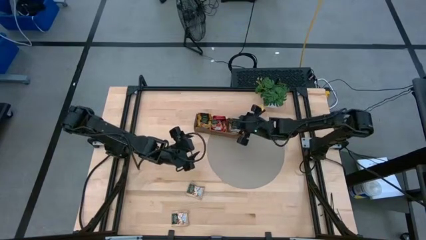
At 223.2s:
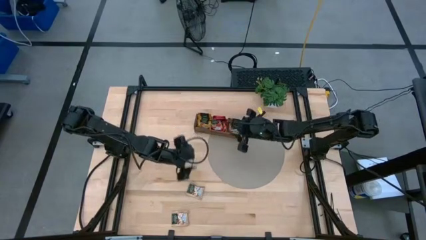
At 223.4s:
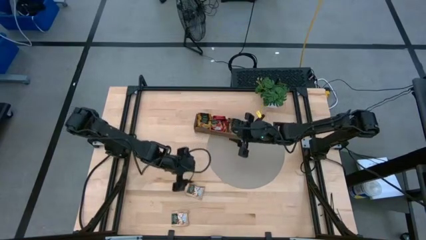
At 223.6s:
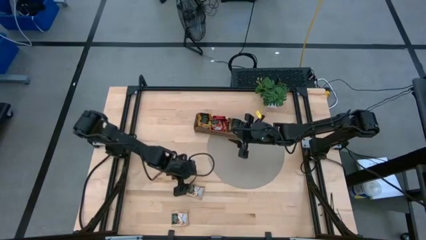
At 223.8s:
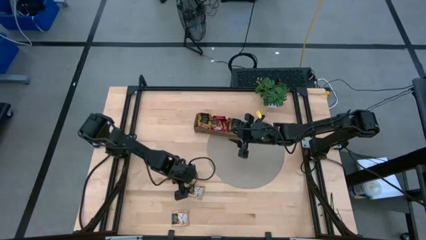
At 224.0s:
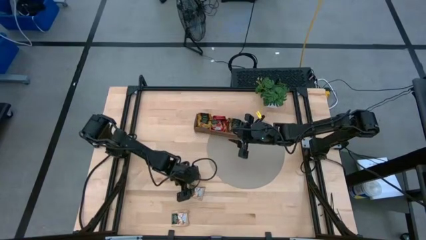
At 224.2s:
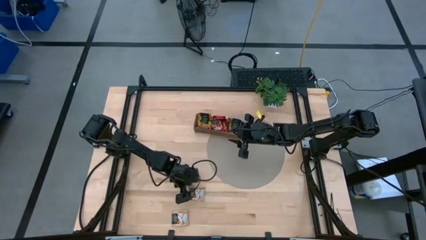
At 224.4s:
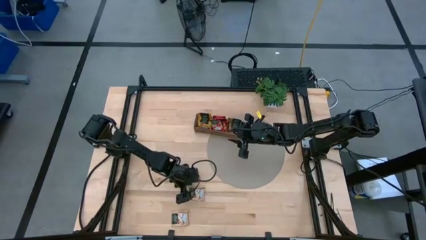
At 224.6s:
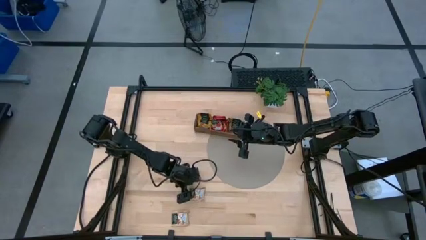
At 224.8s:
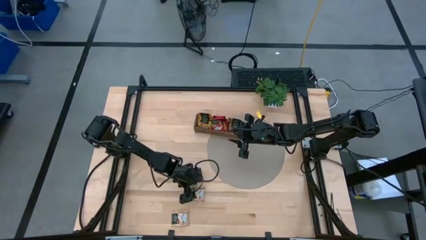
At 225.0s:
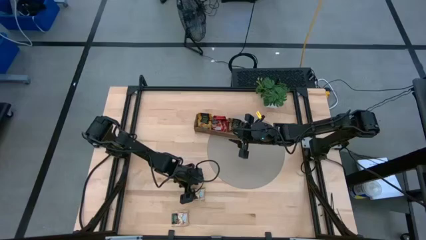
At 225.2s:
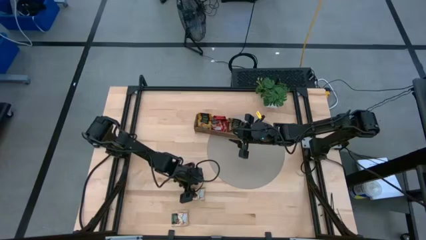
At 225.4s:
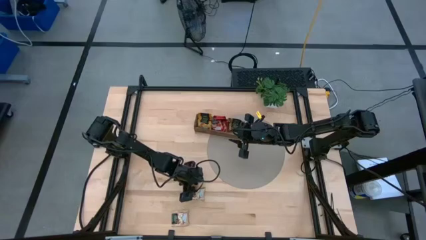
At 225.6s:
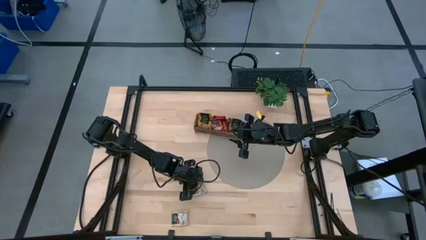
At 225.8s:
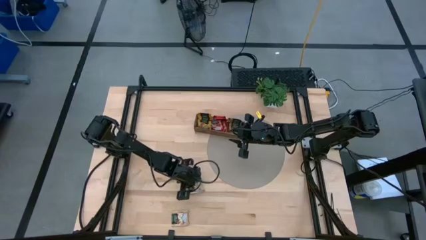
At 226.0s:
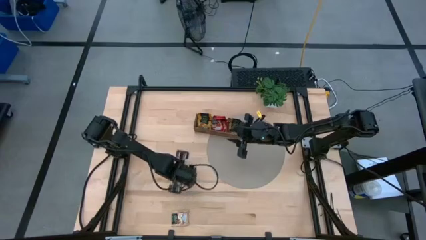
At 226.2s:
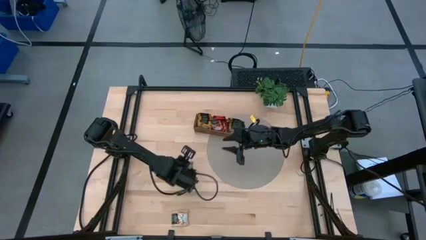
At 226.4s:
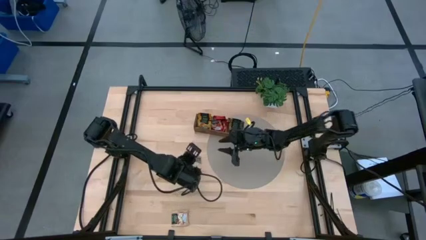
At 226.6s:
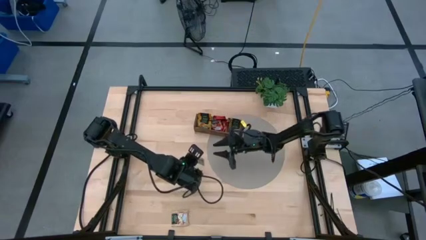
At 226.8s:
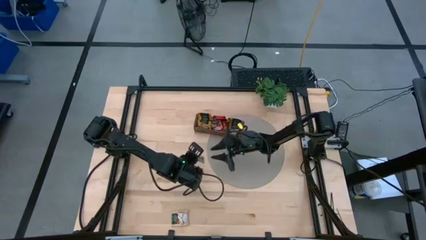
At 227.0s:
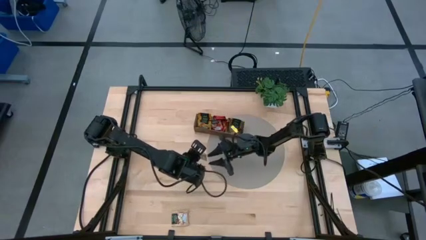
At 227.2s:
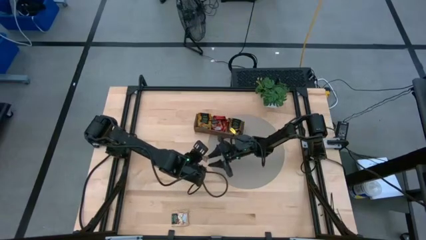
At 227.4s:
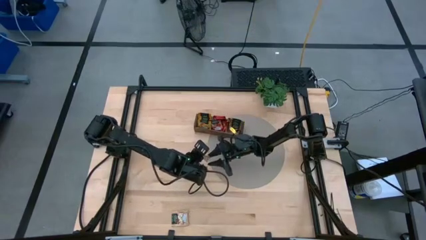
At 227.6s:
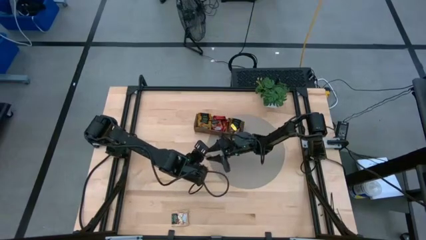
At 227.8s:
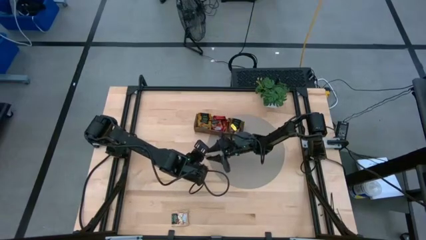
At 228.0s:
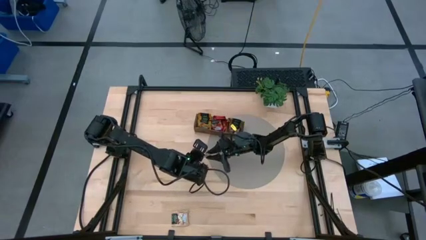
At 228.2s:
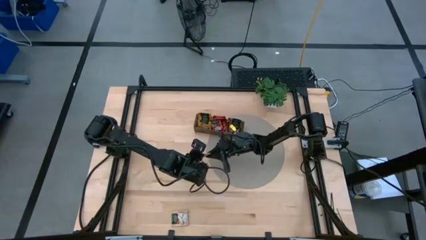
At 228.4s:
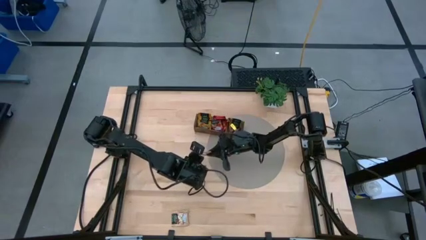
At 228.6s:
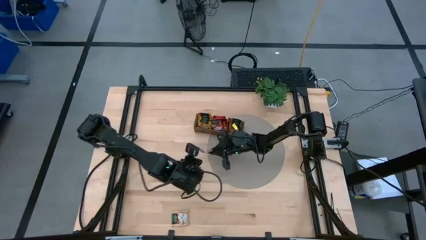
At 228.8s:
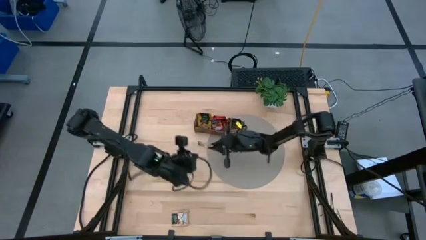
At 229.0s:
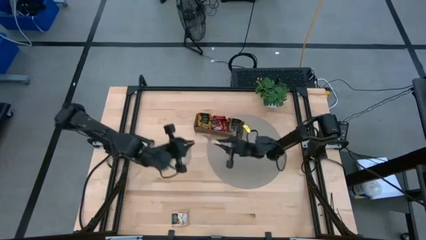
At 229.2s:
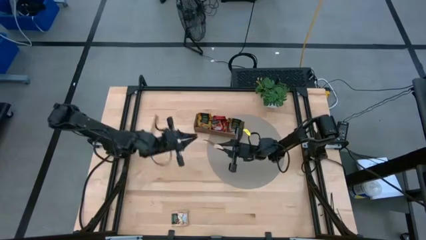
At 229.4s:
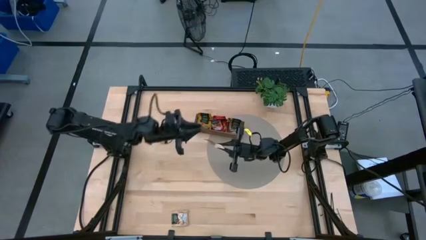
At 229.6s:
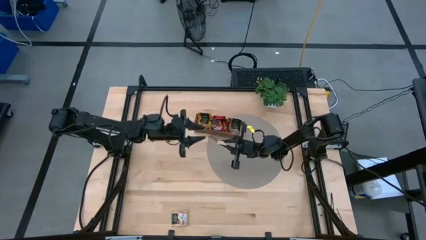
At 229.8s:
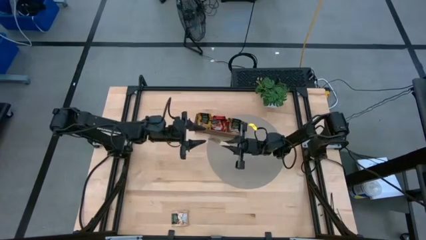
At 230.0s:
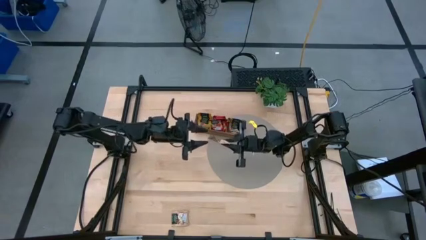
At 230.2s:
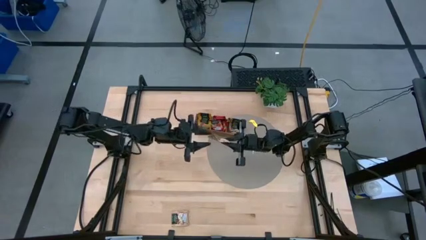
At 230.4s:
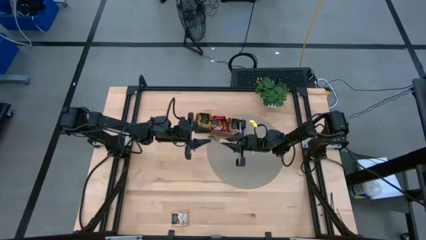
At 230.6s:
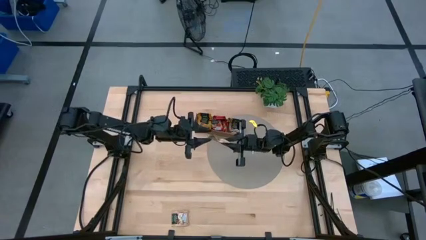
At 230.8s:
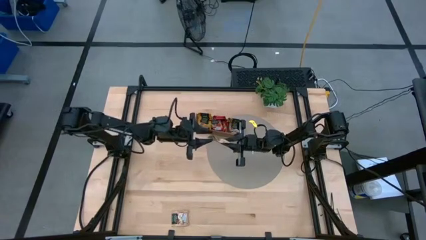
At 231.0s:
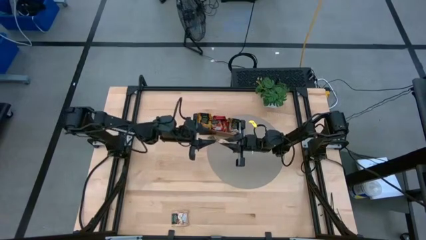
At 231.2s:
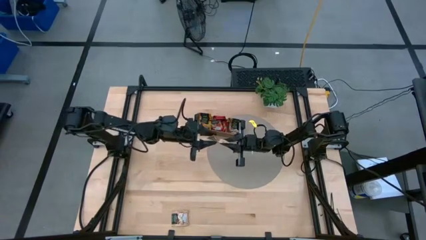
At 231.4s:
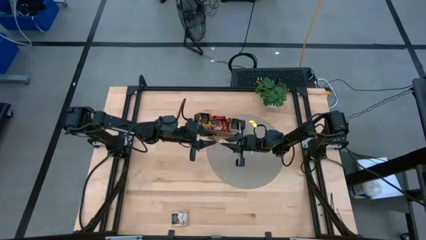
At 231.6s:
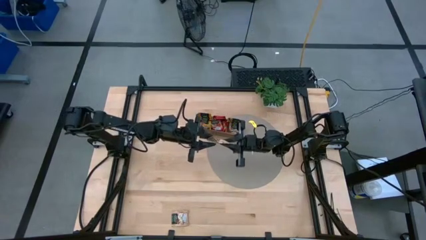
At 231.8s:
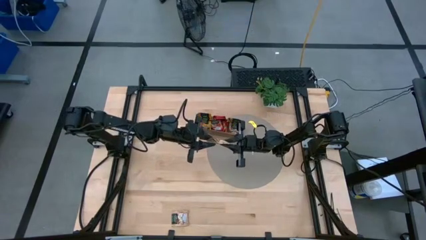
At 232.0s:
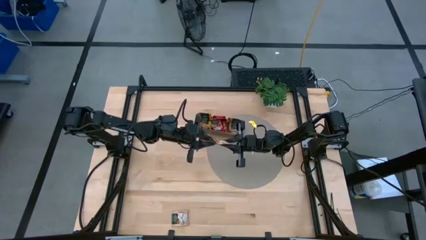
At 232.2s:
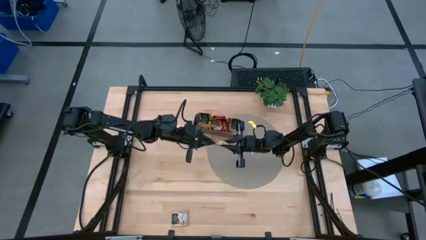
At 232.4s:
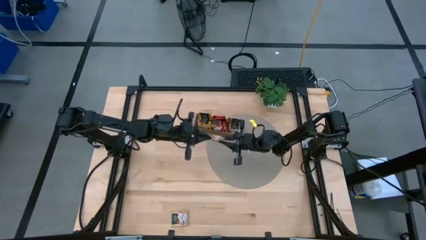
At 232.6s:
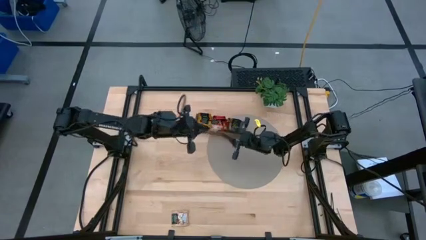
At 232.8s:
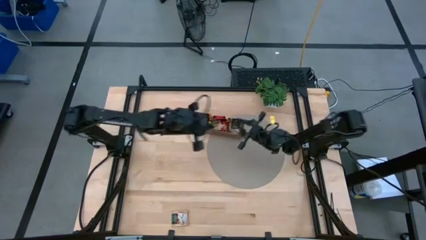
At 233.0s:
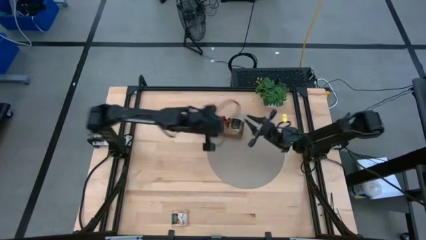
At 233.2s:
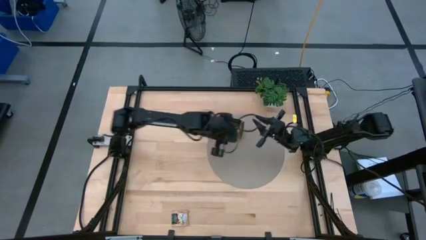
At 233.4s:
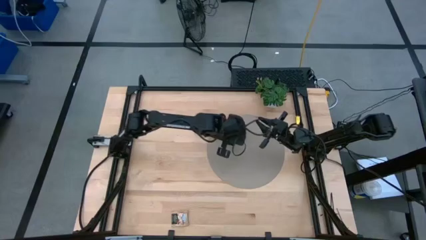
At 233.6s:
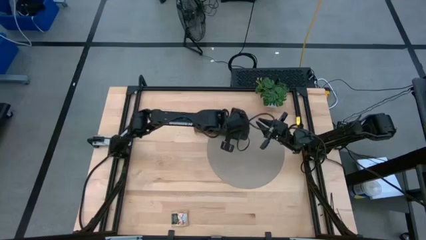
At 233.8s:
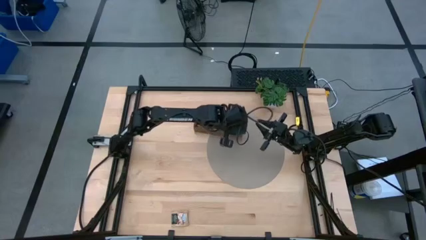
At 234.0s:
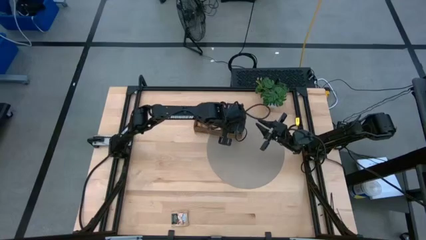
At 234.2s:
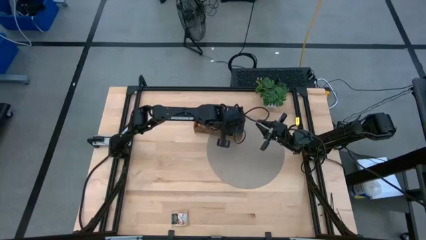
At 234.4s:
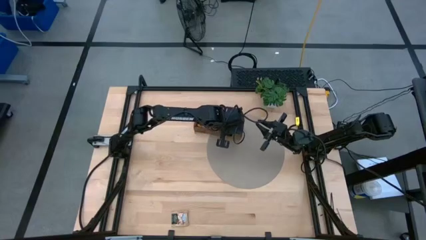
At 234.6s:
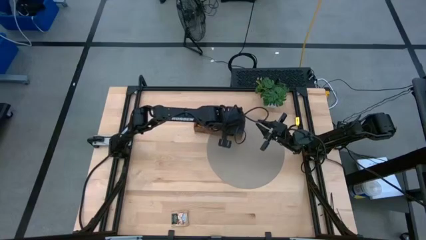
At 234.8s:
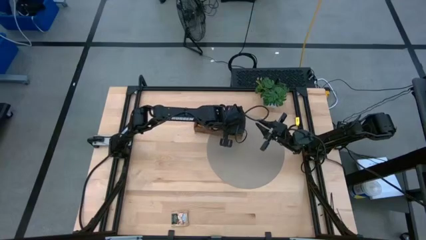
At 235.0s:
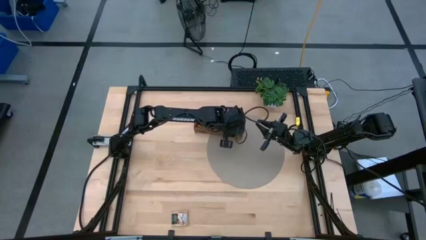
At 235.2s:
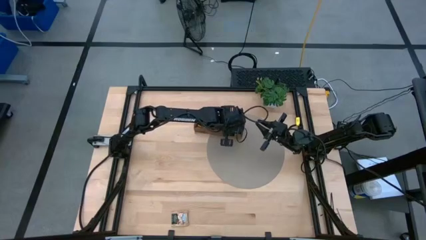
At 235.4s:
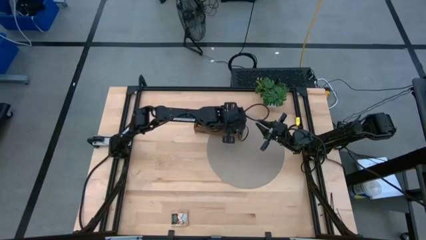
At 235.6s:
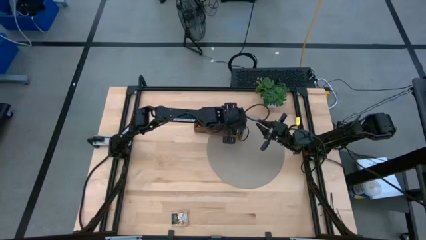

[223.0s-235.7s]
Task: Pick & Place Tea
Put the brown tea bag into the right section of the wooden organizer

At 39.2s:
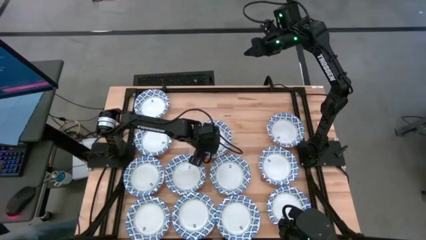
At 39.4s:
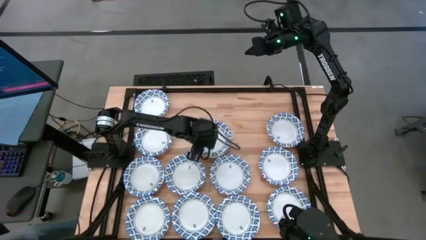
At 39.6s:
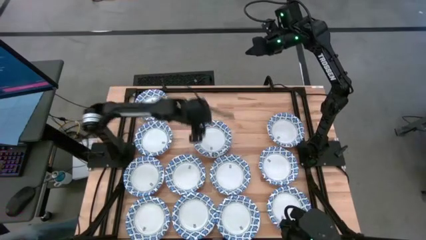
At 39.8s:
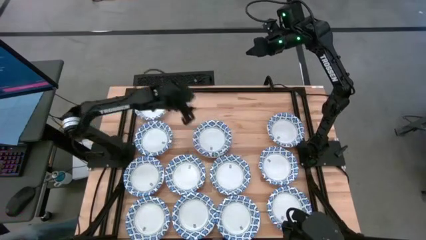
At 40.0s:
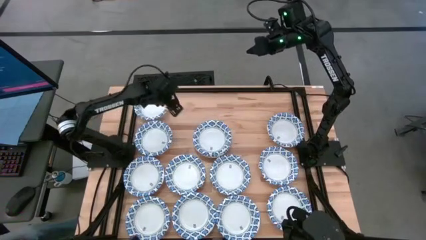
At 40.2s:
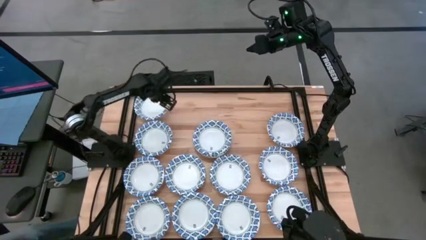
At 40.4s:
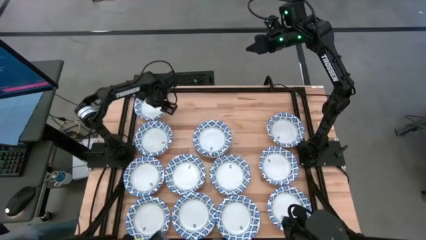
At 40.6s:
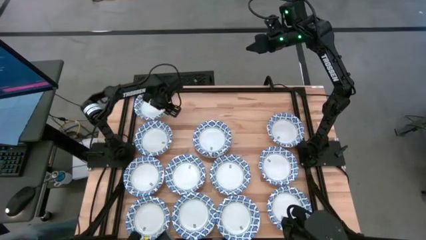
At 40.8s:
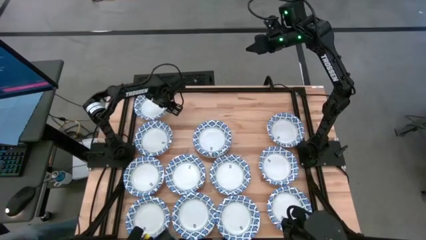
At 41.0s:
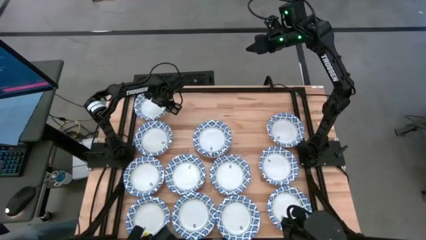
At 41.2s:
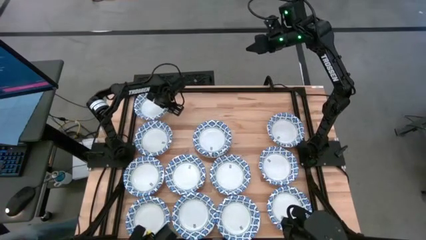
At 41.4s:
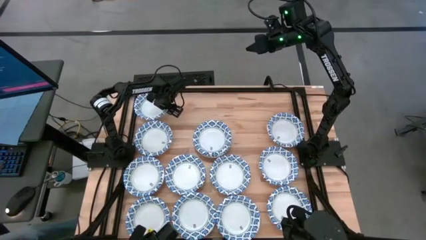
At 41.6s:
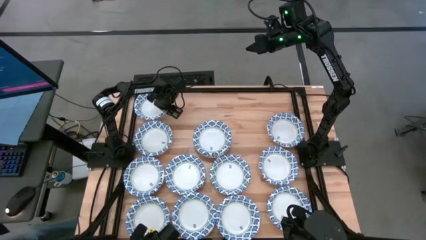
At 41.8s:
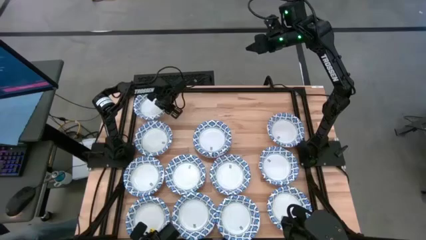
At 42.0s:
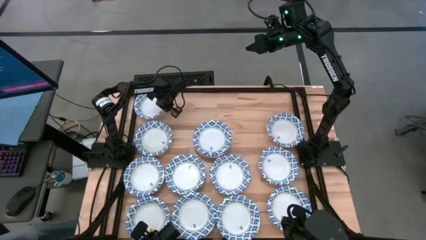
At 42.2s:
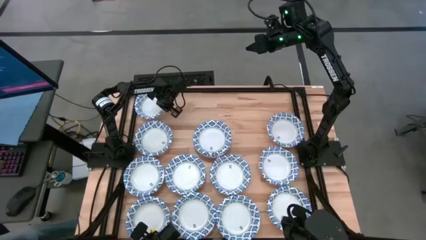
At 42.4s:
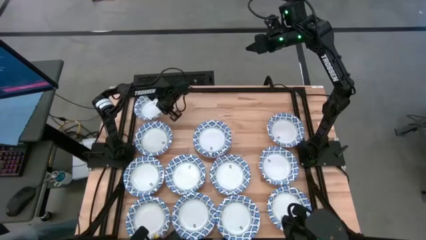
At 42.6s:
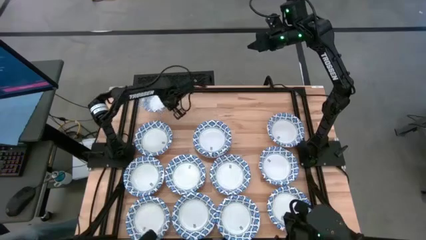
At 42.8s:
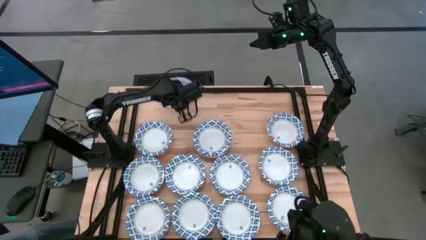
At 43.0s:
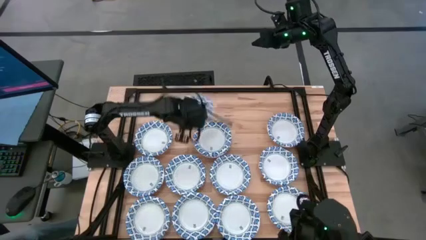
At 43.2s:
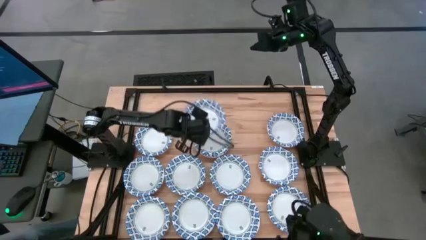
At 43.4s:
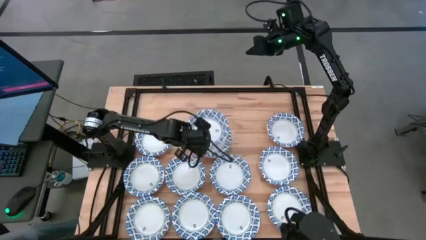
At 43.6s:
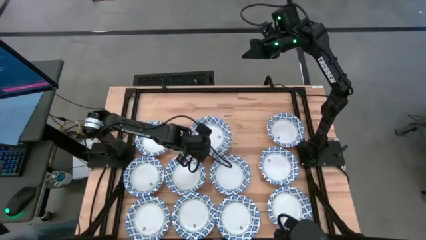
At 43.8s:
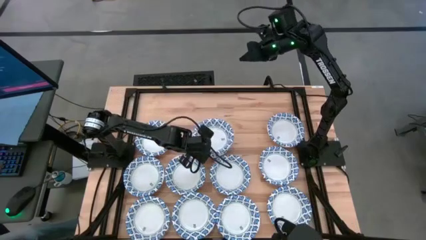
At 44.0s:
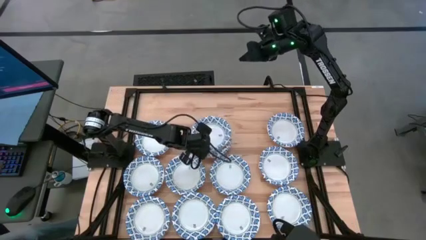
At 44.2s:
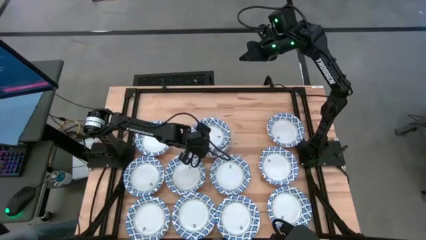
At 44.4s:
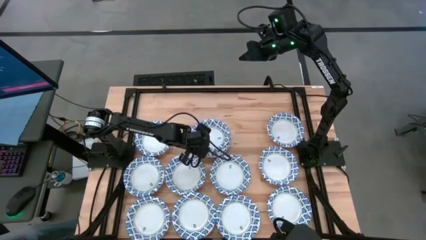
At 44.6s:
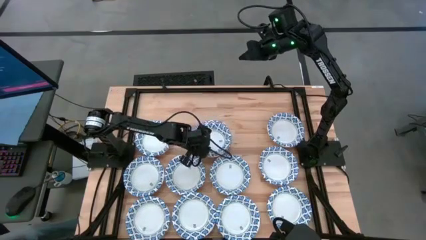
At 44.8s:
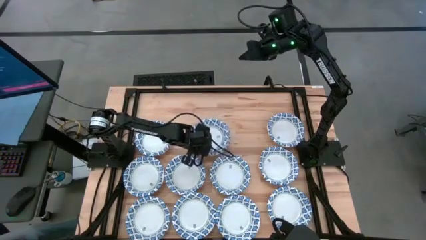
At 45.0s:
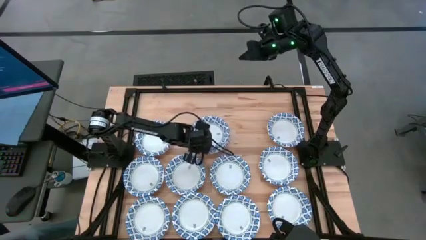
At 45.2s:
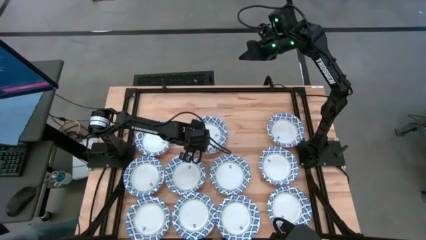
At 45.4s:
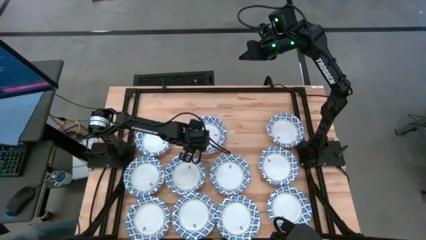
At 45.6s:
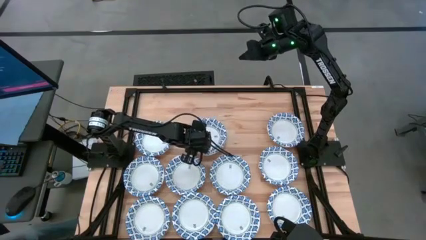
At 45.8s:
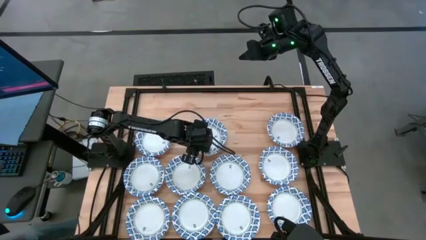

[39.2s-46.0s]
Task: Nest bowls inside each other
Stack the blue bowl on top of the blue bowls
